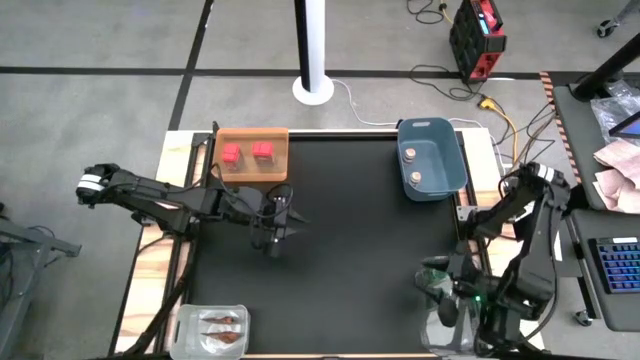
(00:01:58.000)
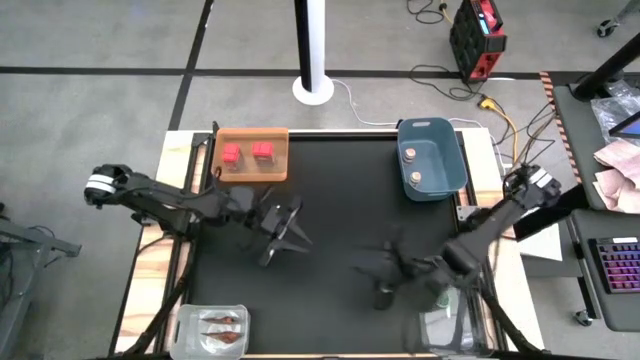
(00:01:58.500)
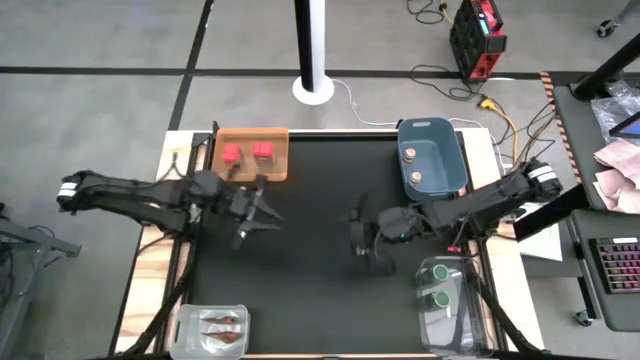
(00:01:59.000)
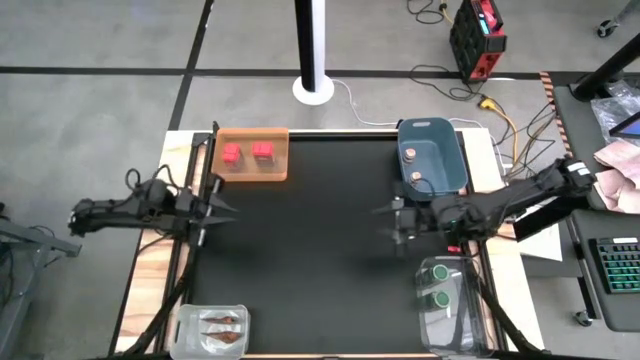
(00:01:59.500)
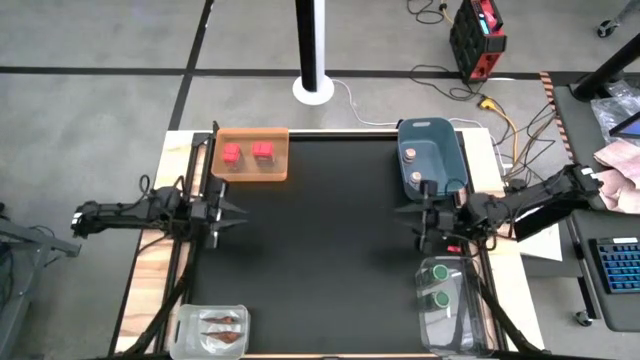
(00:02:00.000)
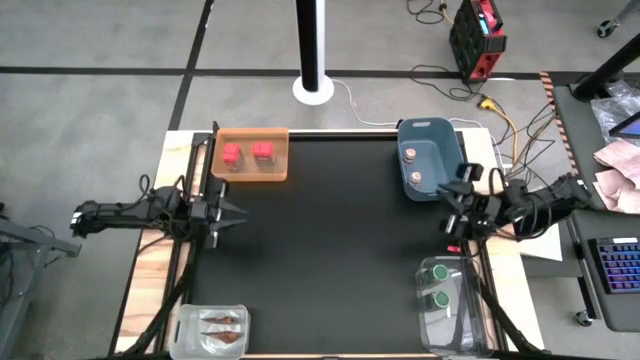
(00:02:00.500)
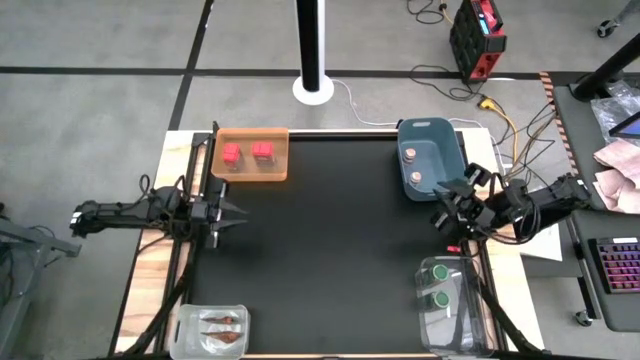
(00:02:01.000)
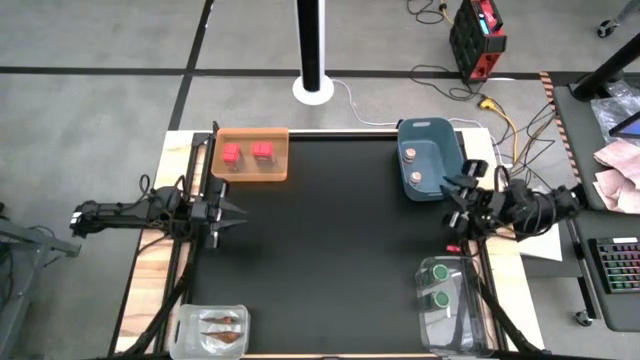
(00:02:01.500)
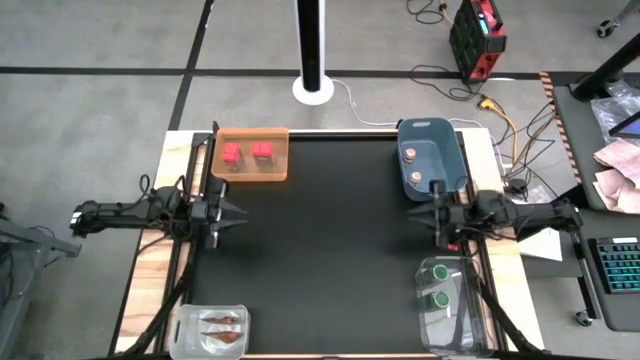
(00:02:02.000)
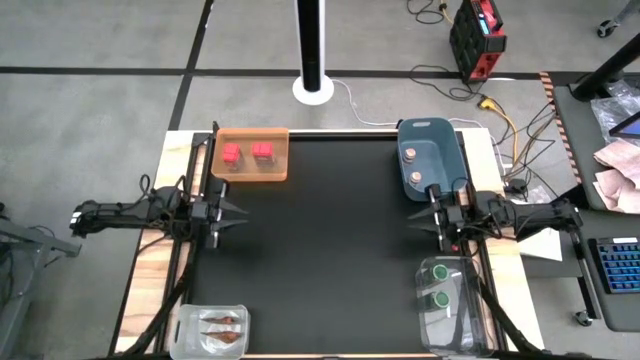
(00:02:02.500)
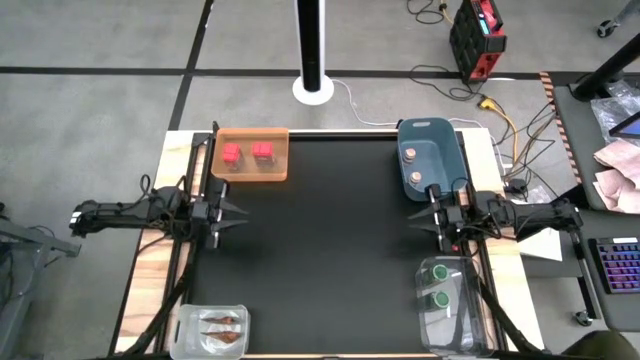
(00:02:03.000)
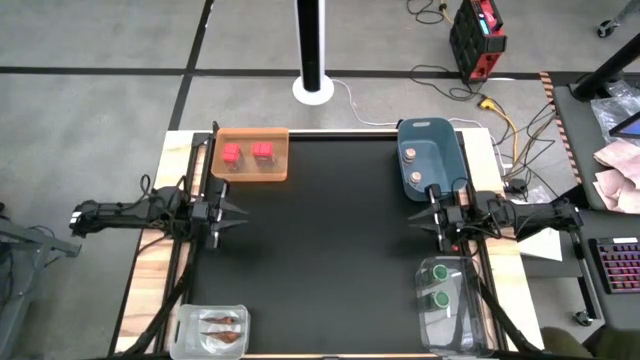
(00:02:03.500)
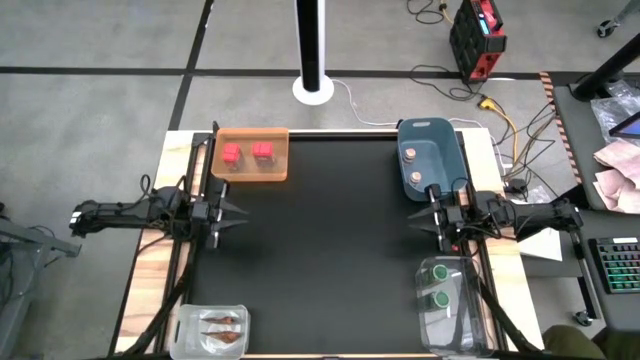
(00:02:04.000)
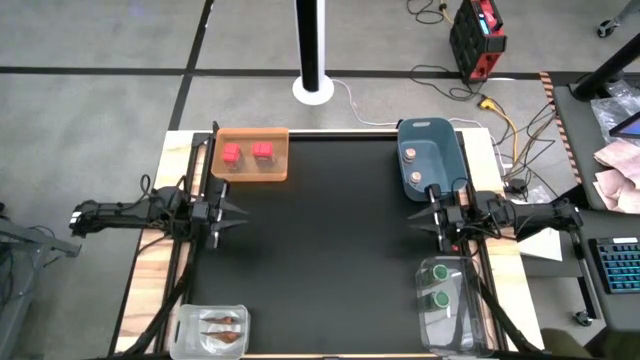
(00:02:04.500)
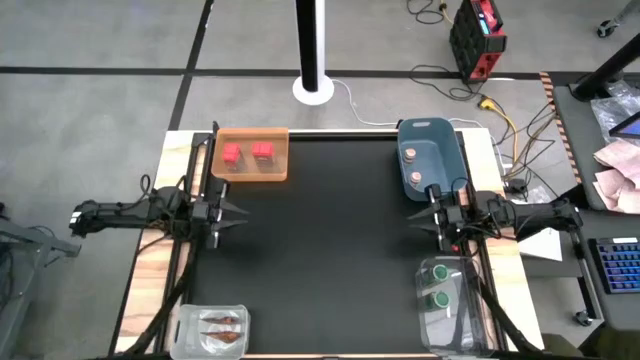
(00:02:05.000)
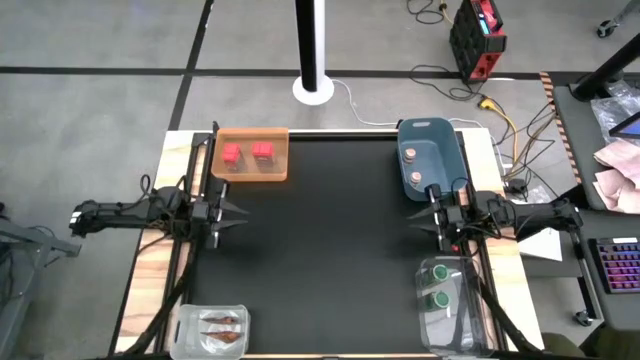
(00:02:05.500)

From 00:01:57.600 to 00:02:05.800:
Task: Sort spices by type
Return to Home Position

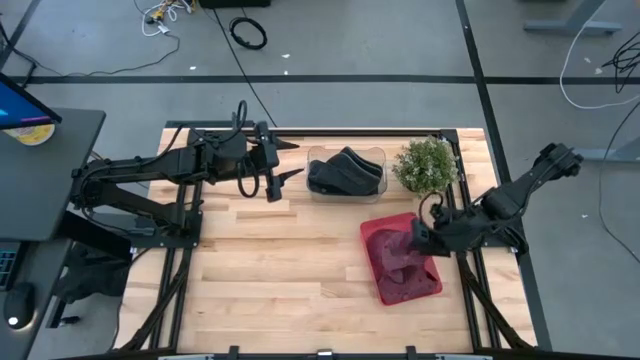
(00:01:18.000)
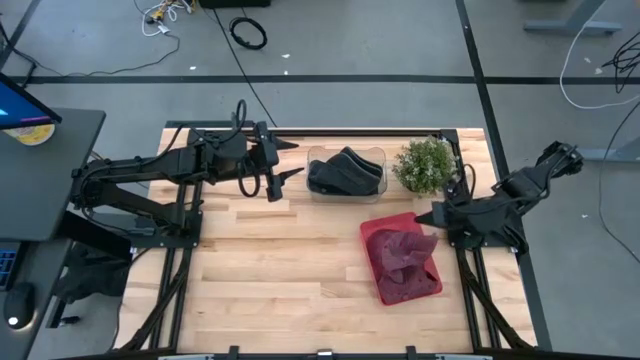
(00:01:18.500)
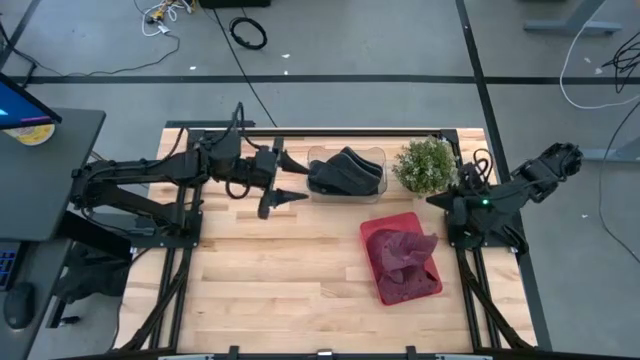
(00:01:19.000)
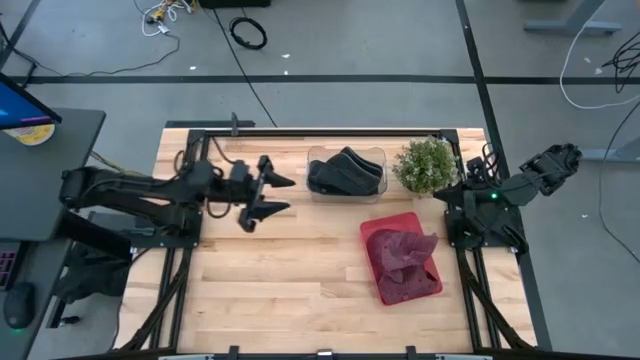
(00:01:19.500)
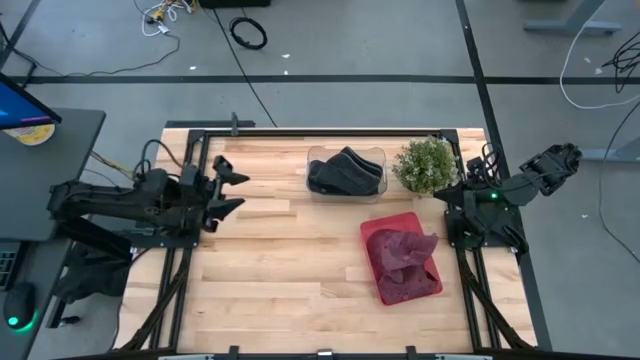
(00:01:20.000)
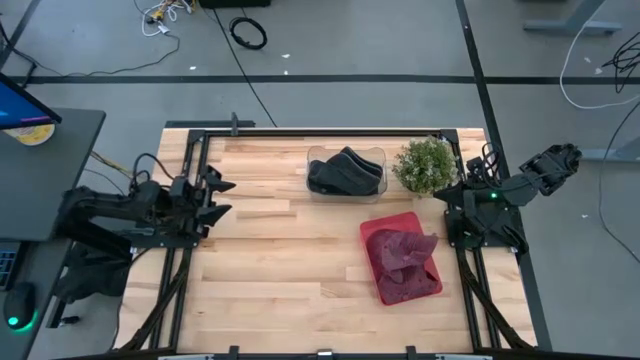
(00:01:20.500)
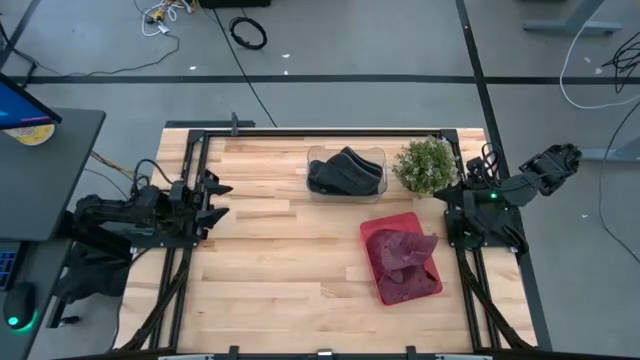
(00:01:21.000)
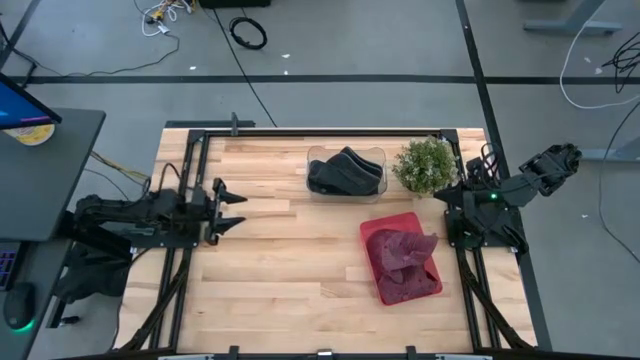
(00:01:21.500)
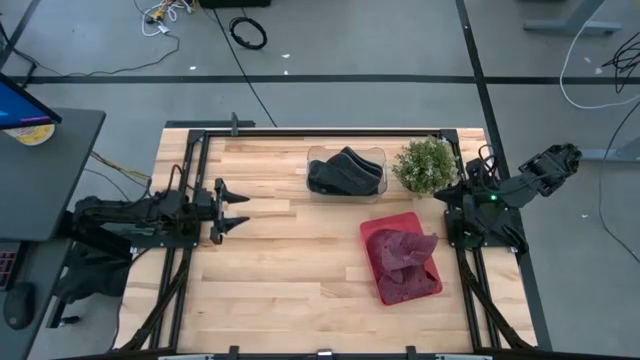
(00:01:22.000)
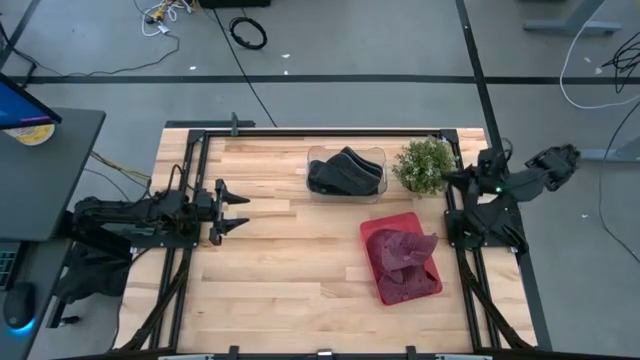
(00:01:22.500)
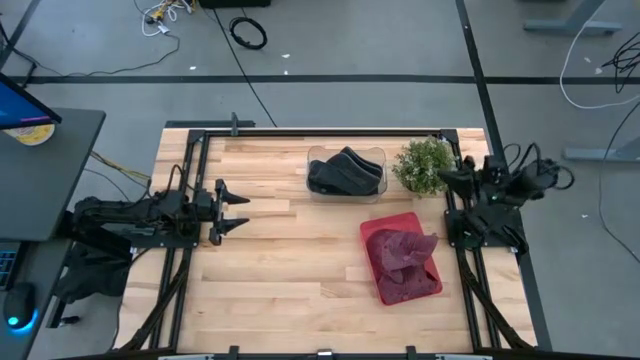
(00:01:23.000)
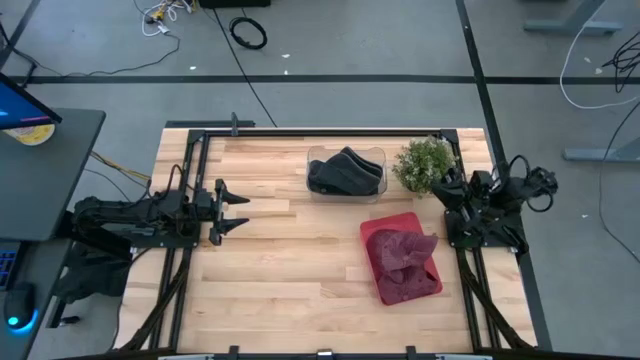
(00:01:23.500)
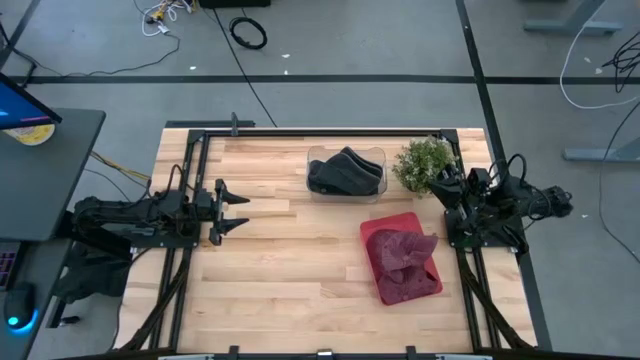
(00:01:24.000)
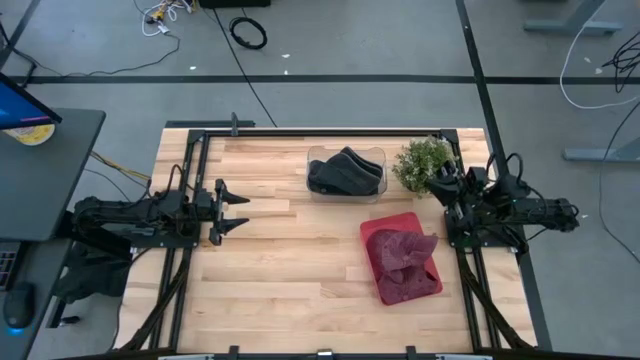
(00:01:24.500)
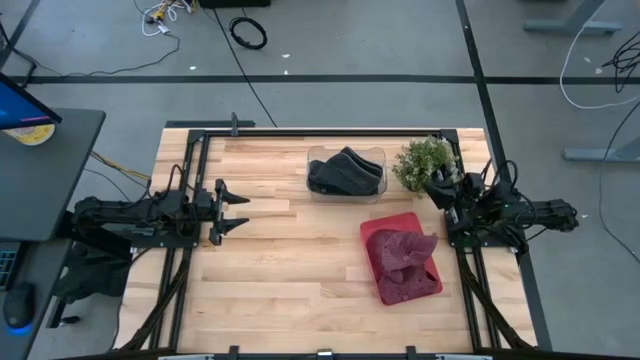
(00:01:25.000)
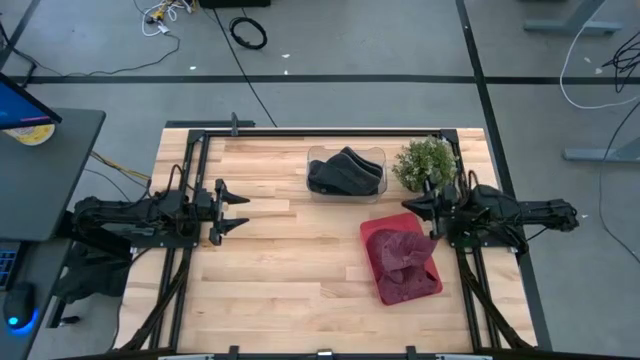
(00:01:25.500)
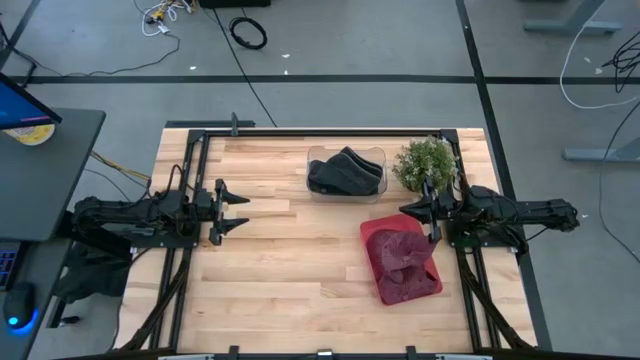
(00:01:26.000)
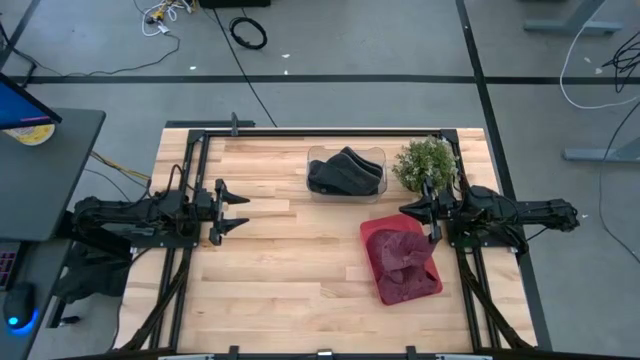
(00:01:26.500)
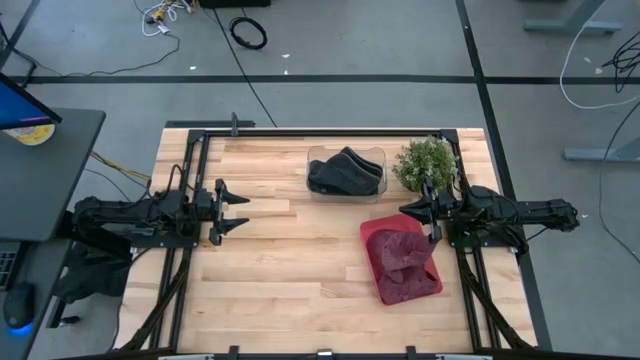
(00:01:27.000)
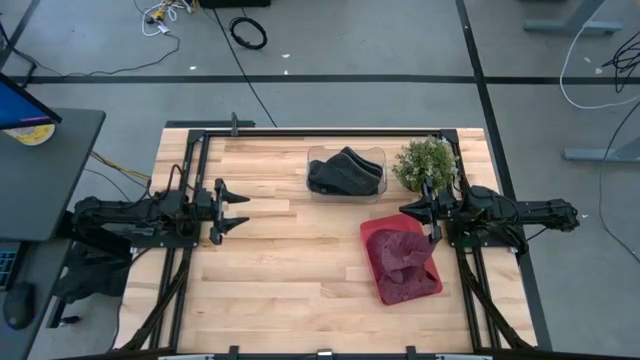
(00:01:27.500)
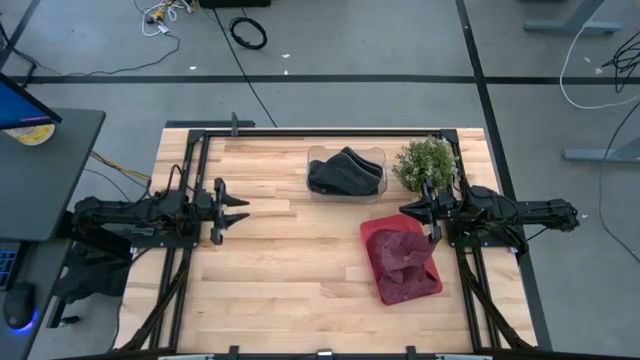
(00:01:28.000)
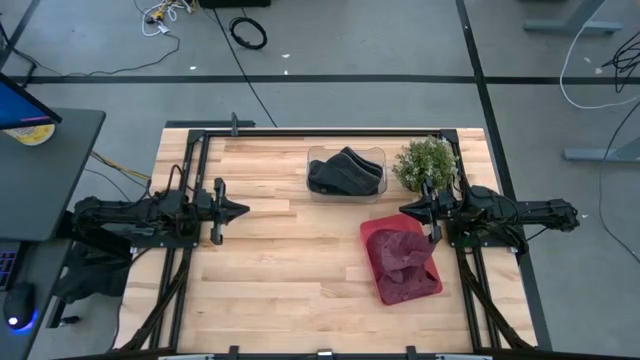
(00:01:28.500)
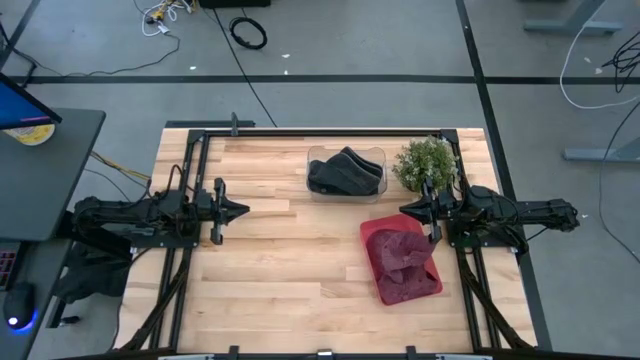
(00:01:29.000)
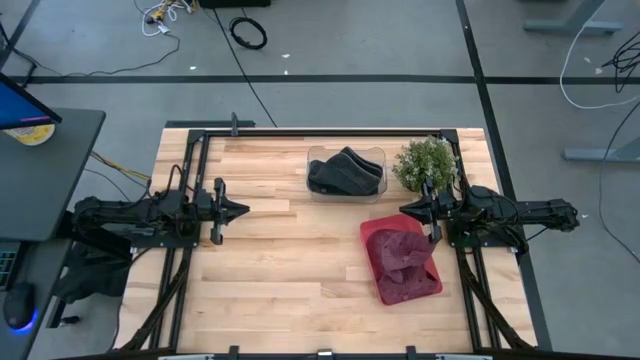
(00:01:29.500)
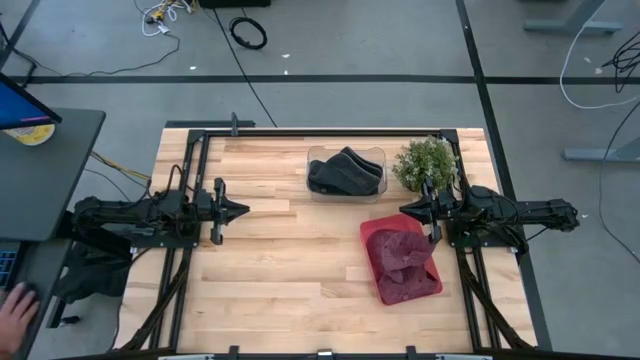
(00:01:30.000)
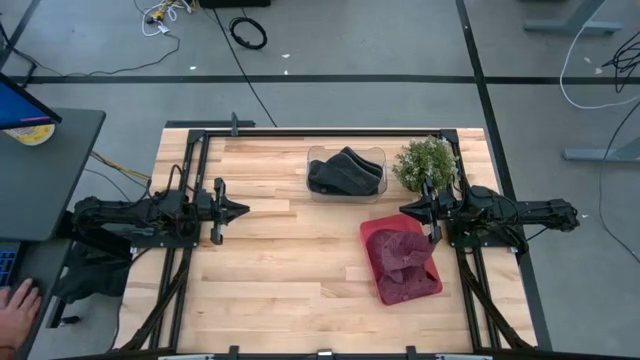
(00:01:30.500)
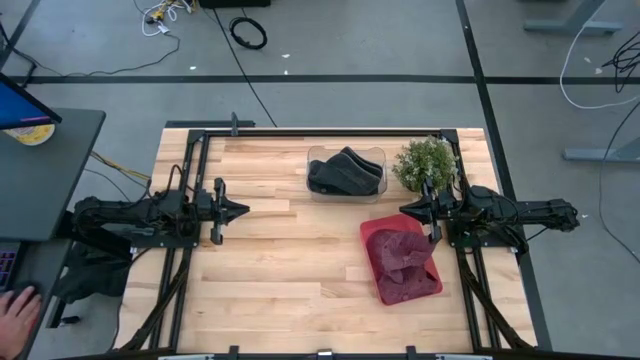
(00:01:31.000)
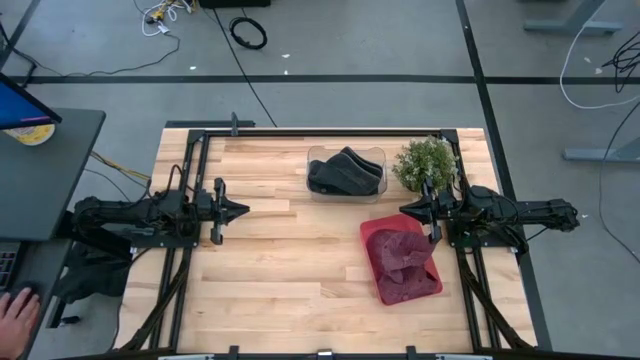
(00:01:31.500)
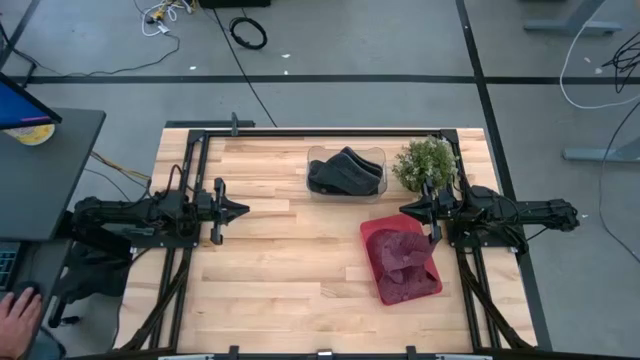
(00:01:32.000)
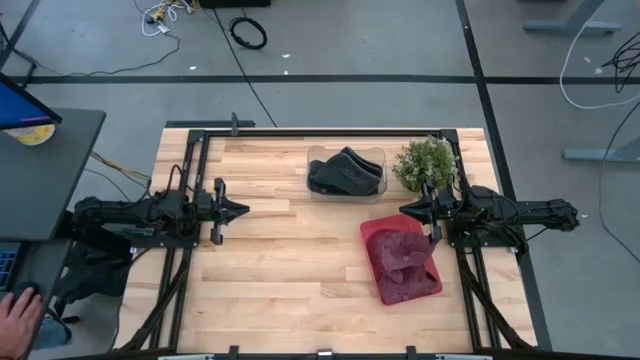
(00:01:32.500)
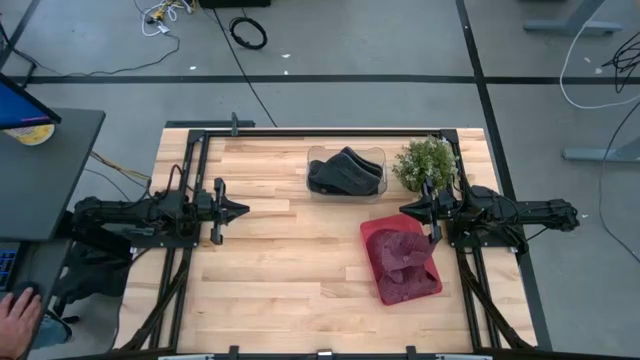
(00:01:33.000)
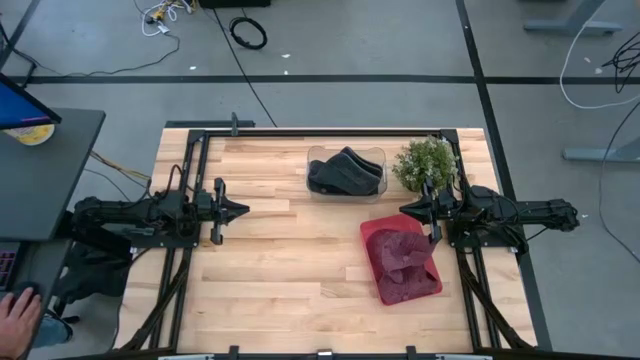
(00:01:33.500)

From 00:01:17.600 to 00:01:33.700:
Task: Pick & Place hat
Return to home position
